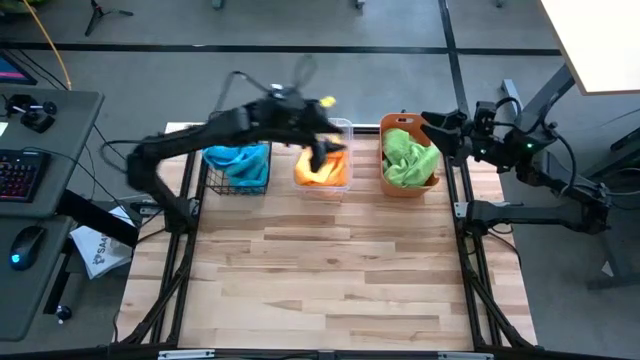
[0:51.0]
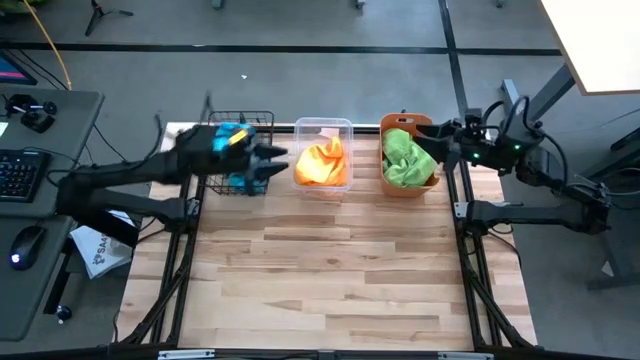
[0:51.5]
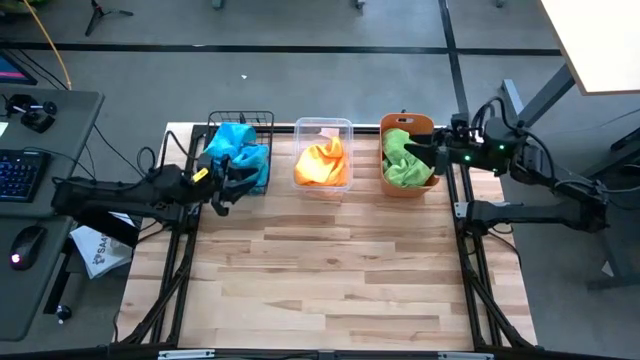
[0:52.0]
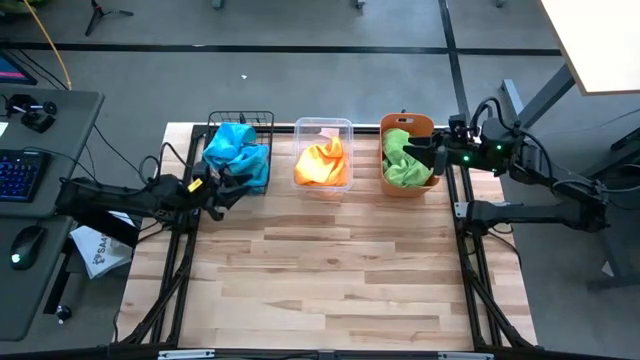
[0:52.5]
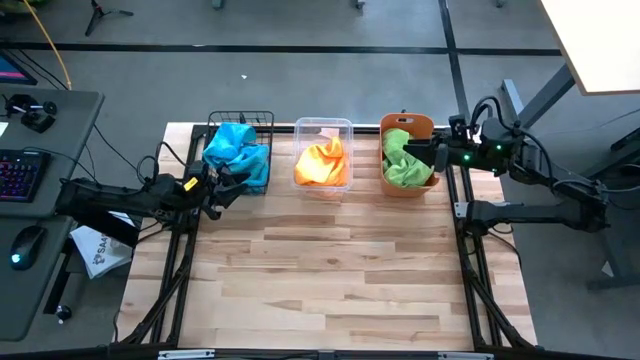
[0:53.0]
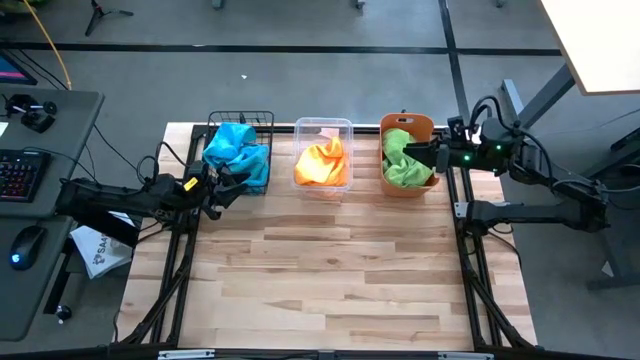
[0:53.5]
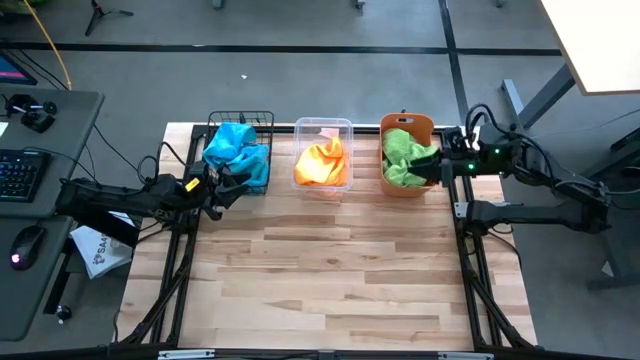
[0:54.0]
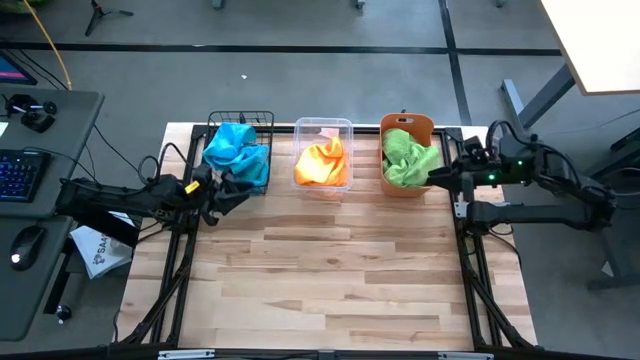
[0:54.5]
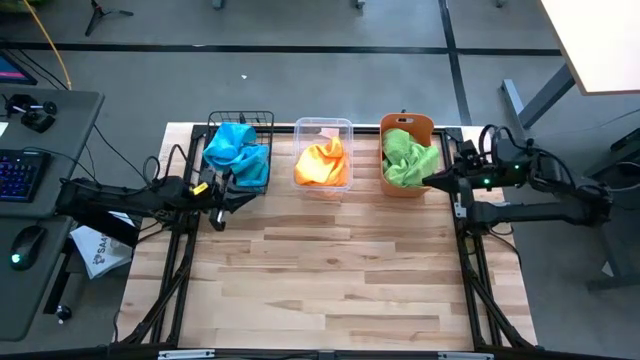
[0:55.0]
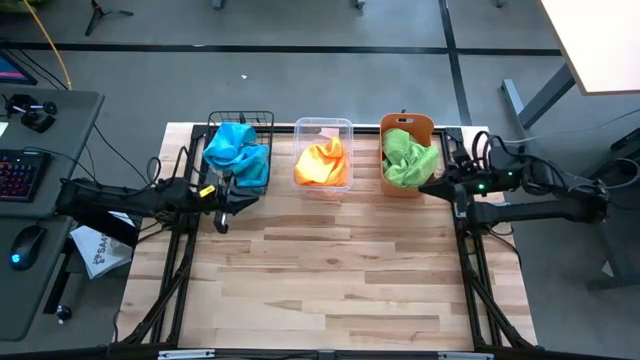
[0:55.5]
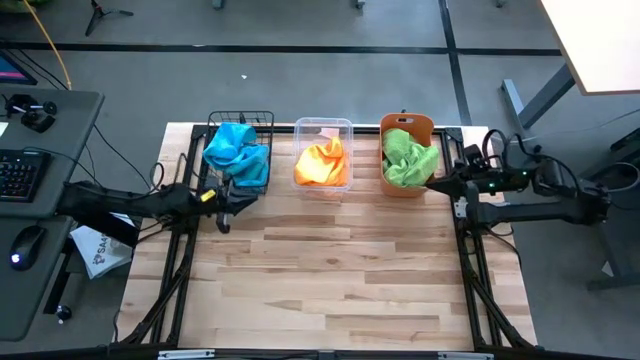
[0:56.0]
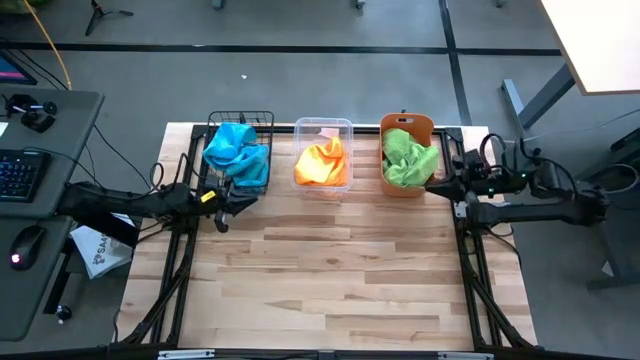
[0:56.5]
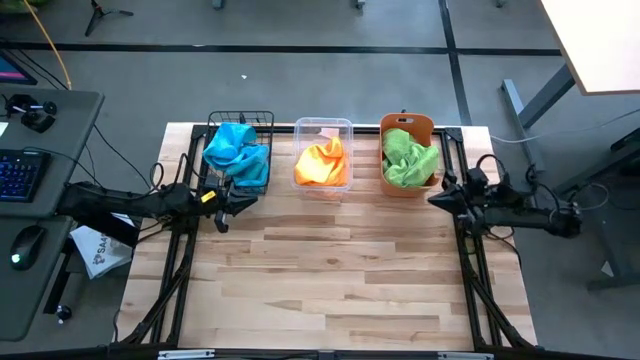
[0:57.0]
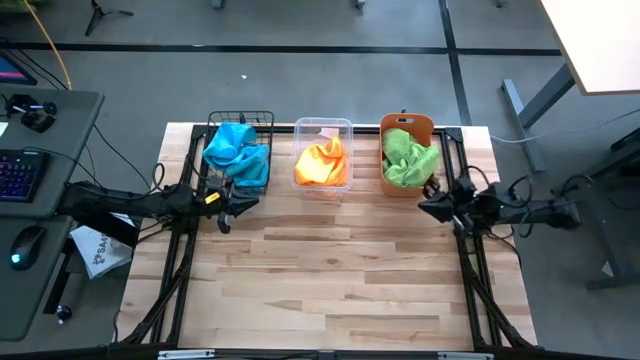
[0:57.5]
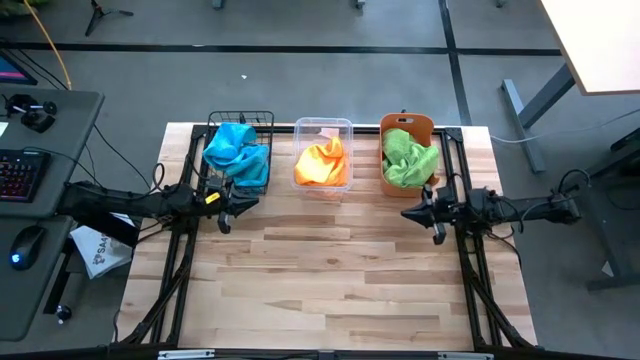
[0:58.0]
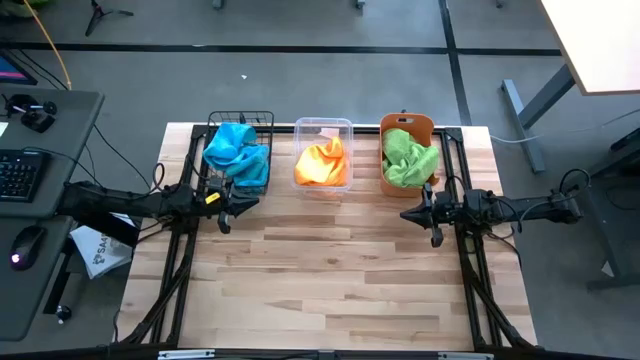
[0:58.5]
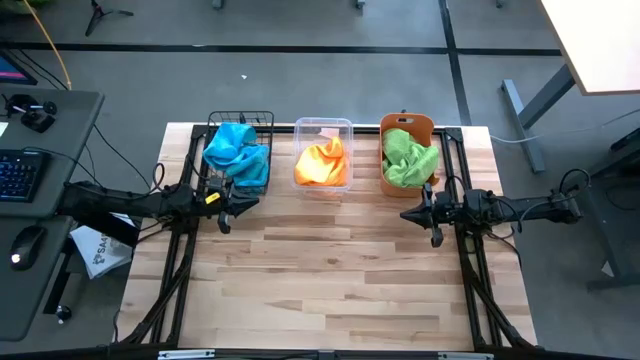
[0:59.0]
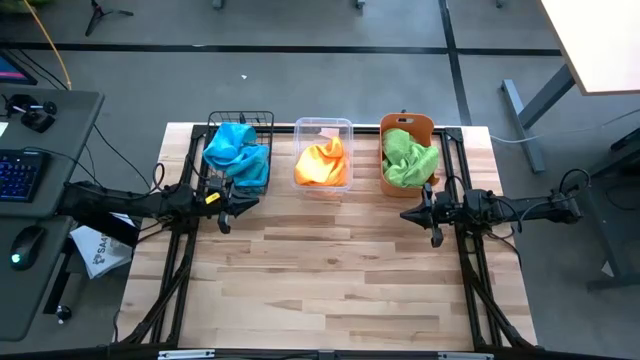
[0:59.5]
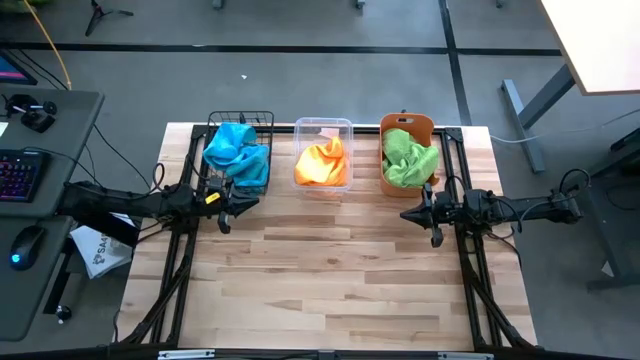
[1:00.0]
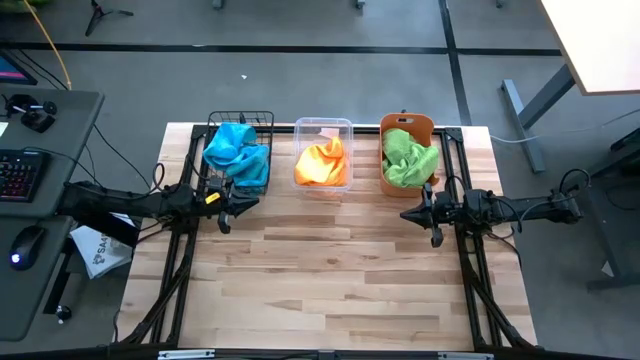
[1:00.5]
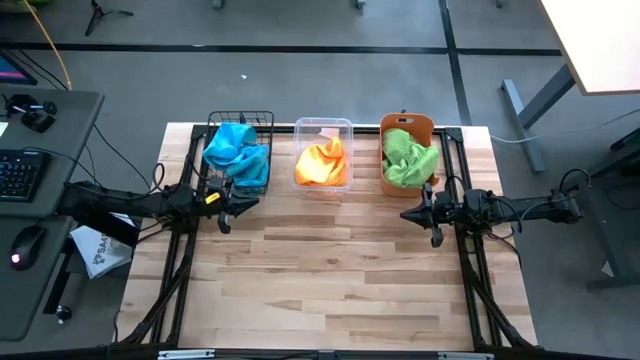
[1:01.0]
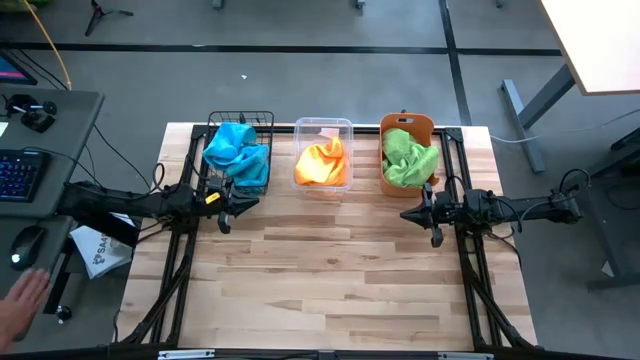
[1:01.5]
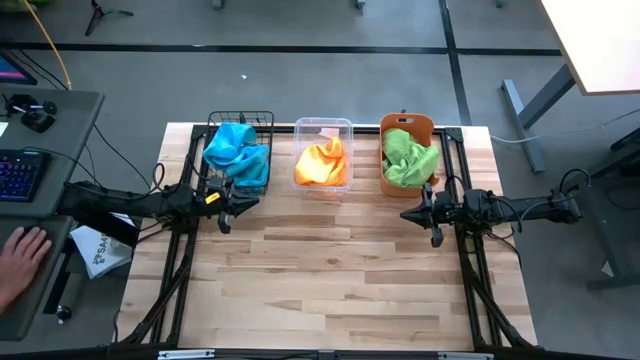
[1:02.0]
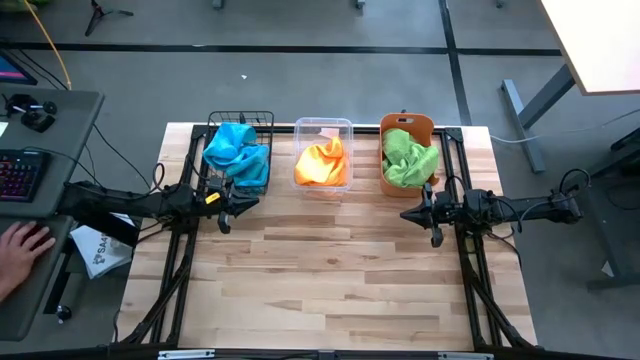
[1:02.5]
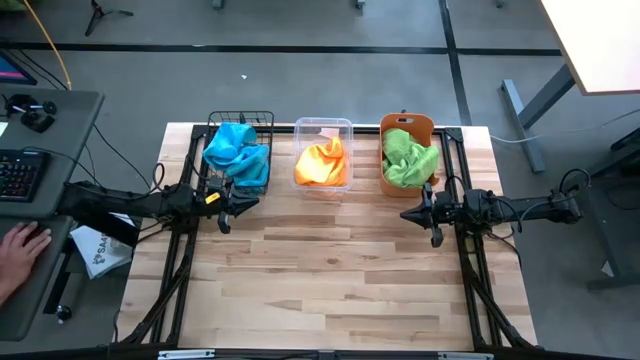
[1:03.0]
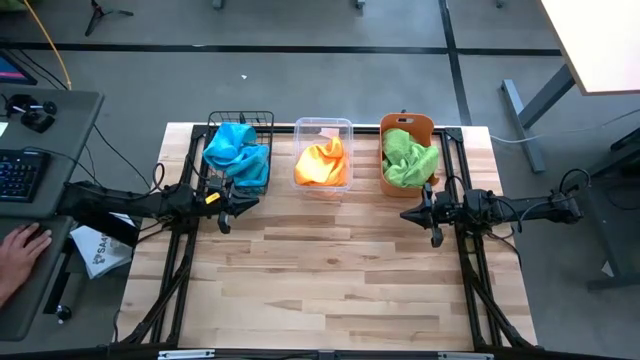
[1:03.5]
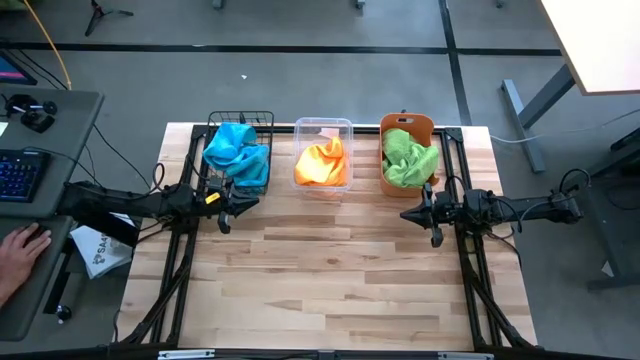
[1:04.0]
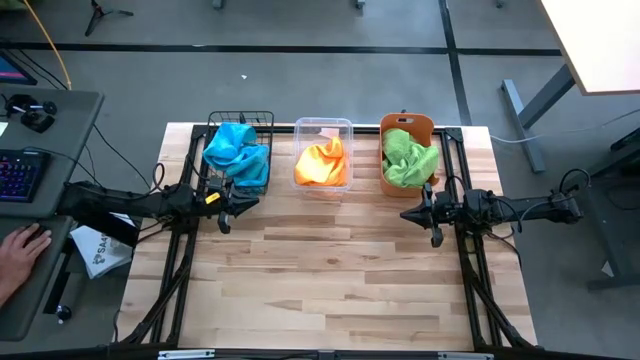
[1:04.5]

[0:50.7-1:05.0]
Task: Sort microfiber towel by color & place in baskets
Return to Home Position

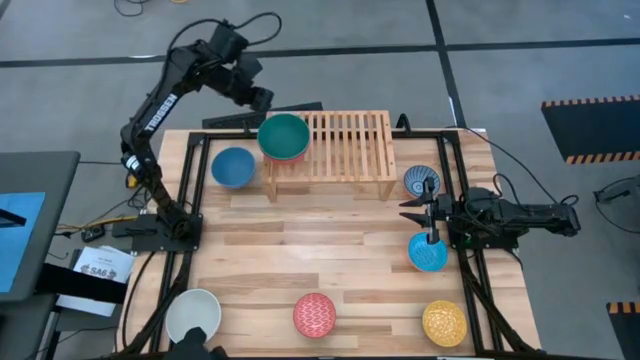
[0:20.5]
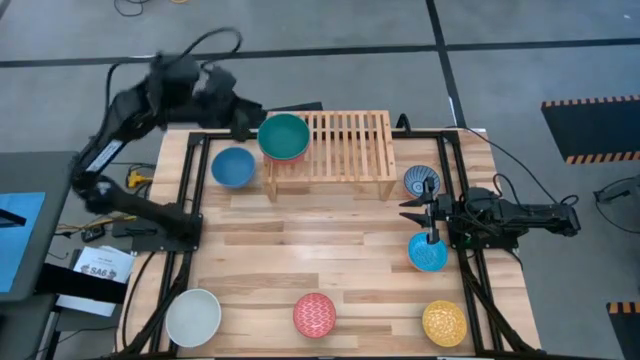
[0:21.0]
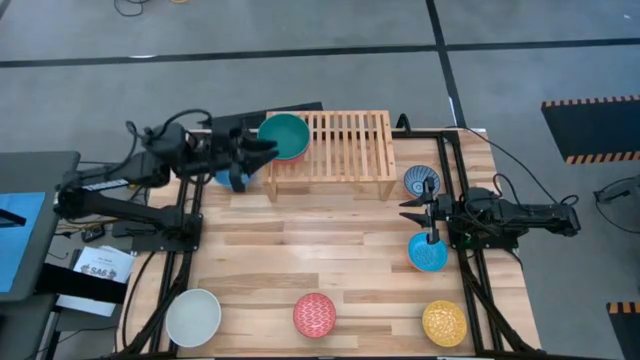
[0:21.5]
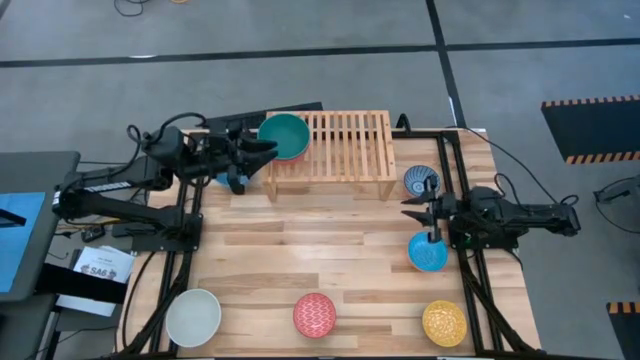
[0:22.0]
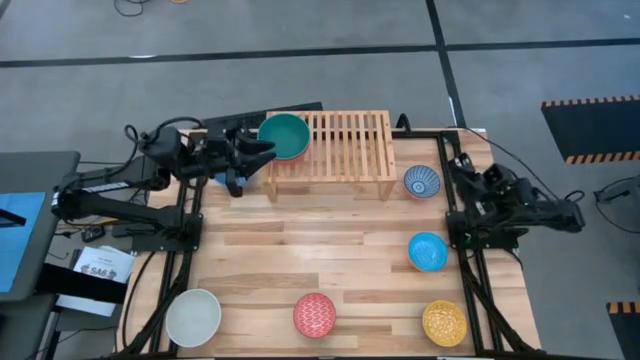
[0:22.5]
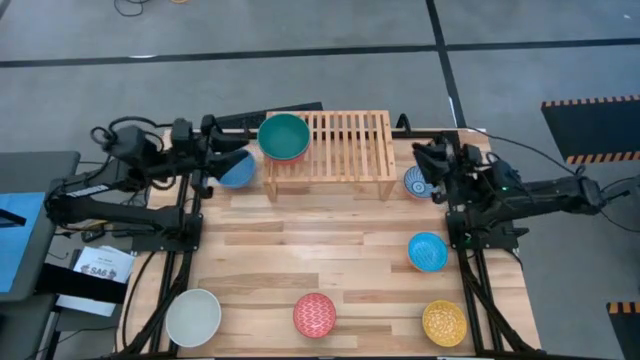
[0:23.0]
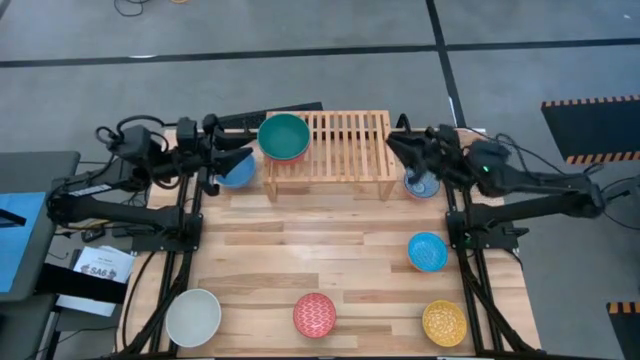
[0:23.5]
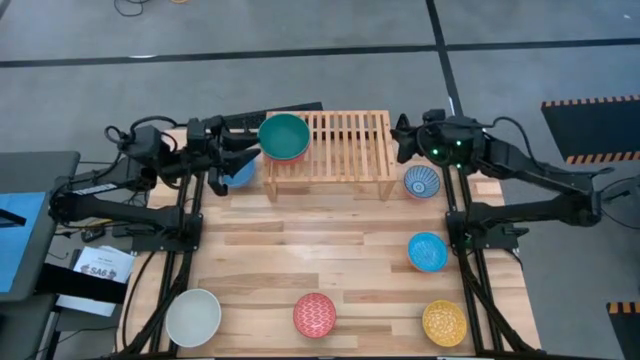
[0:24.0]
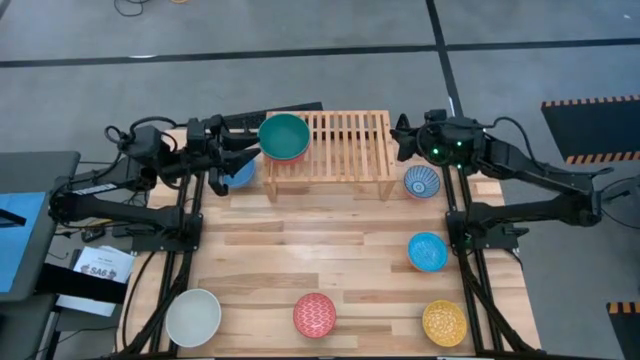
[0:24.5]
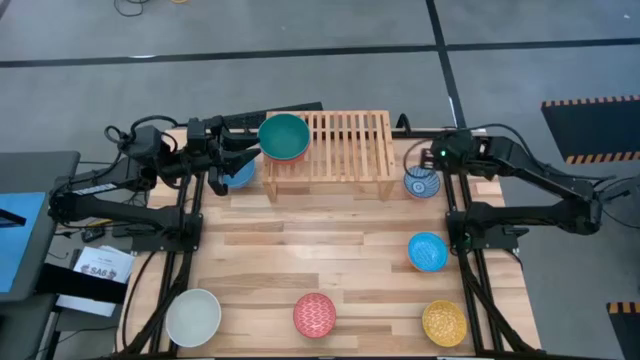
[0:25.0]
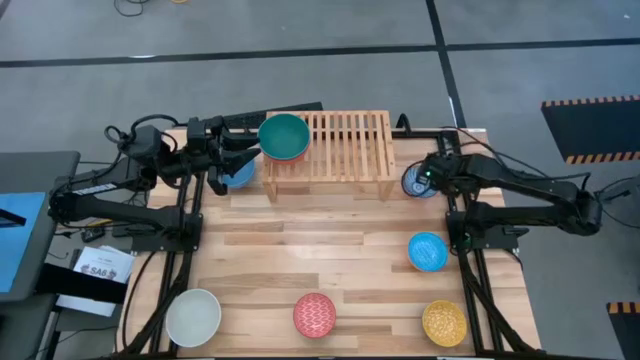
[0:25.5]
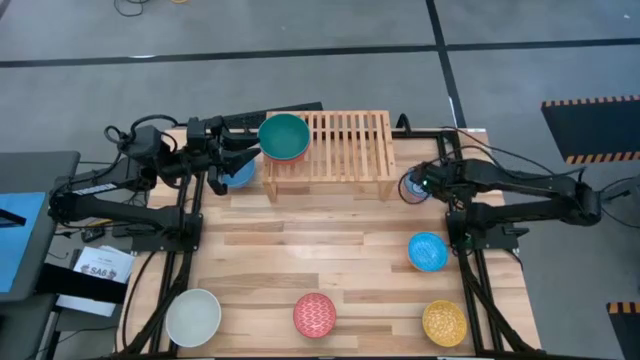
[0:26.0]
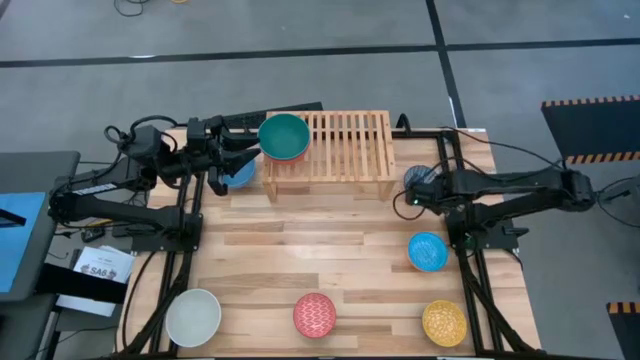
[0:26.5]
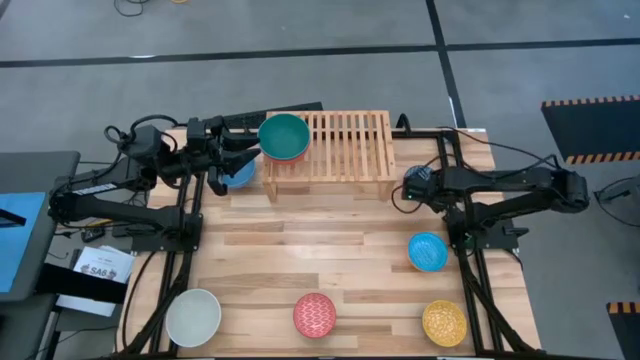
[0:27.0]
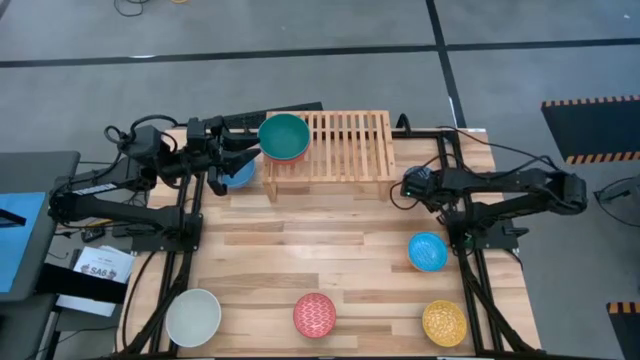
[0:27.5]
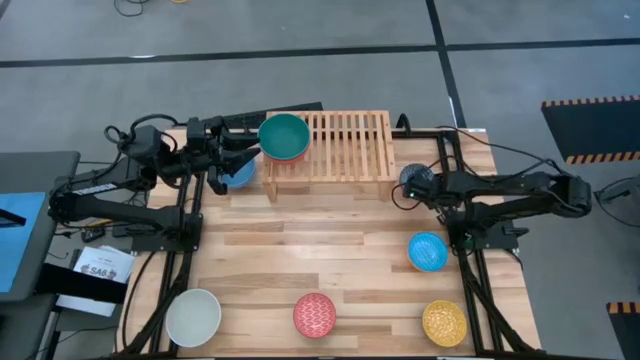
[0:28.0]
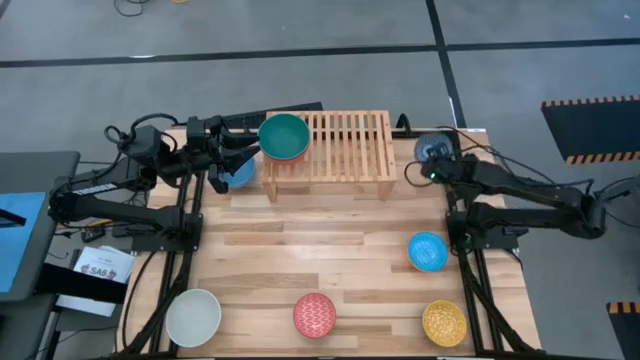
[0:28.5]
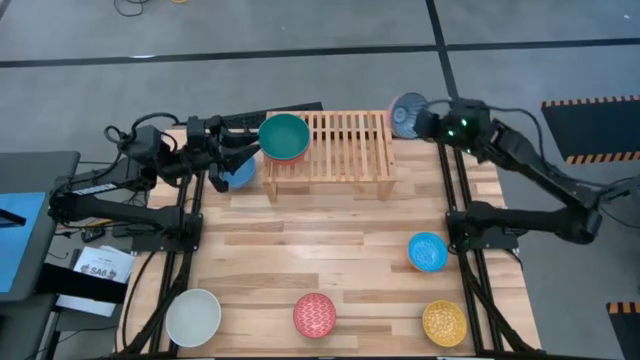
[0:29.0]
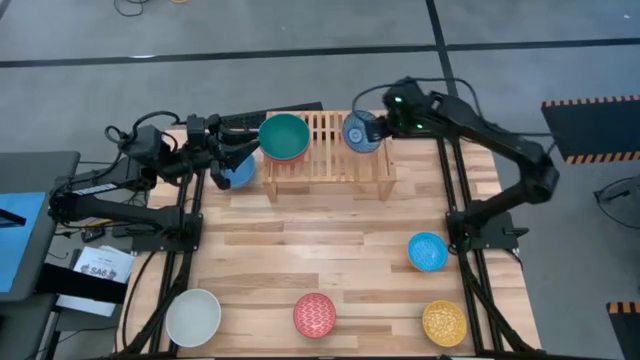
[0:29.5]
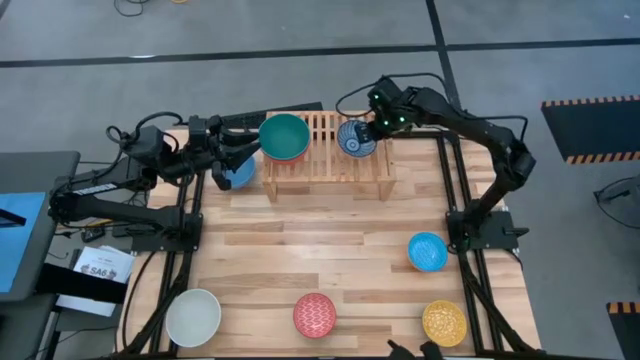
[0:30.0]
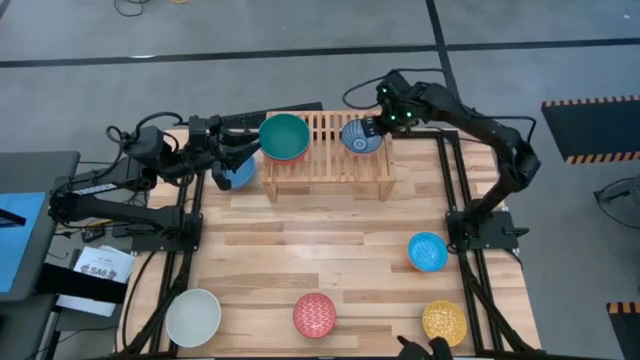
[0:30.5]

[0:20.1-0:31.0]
Task: Place and stack bowls onto a shelf
Put the small blue bowl on the shelf
